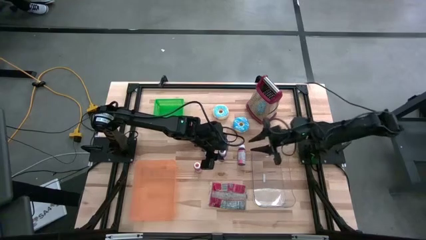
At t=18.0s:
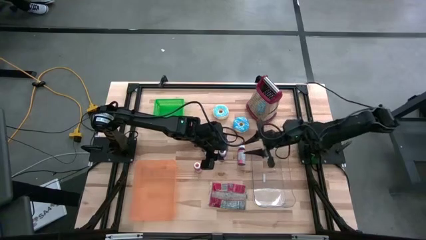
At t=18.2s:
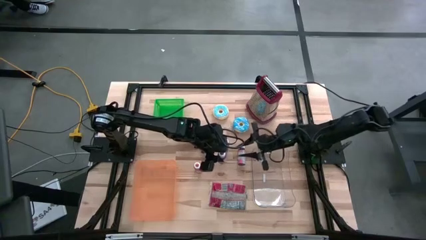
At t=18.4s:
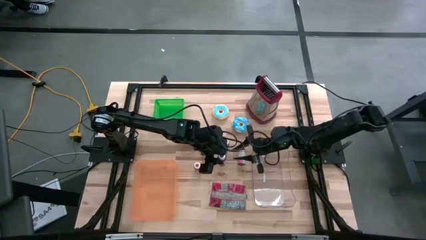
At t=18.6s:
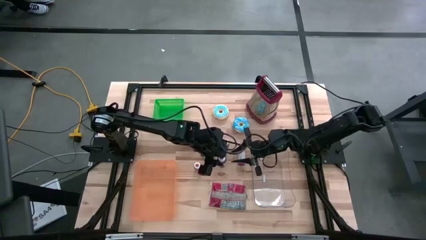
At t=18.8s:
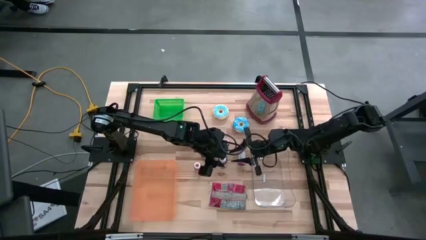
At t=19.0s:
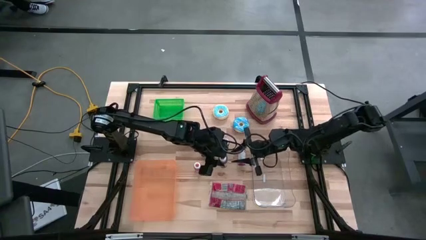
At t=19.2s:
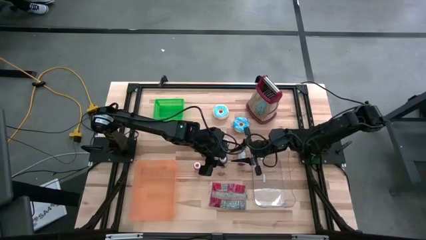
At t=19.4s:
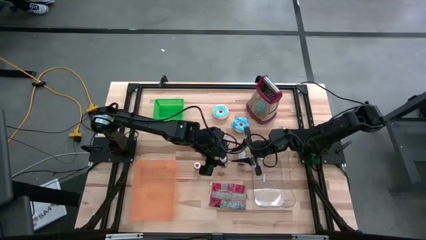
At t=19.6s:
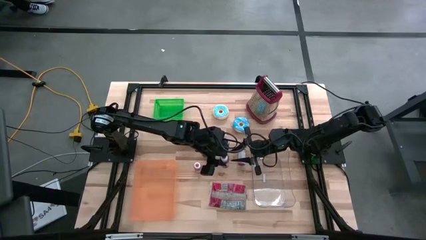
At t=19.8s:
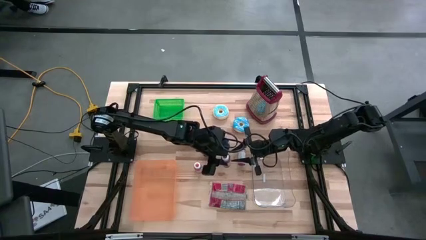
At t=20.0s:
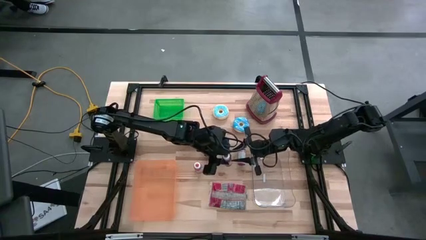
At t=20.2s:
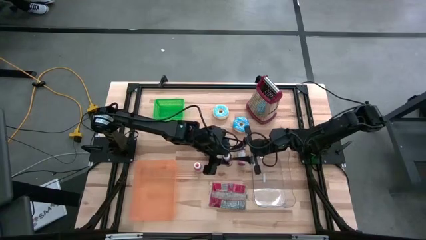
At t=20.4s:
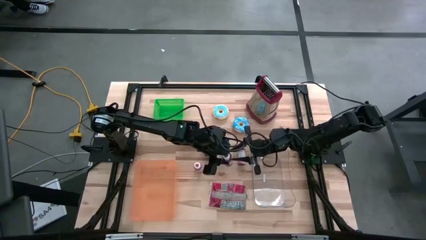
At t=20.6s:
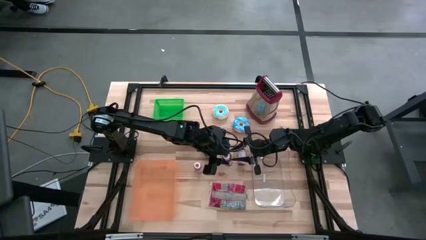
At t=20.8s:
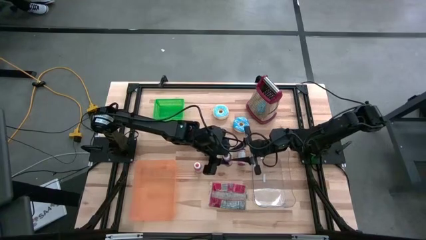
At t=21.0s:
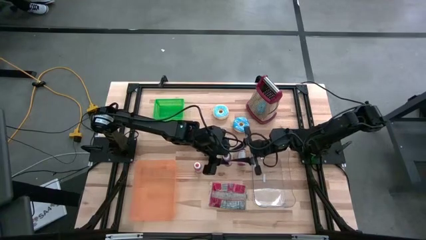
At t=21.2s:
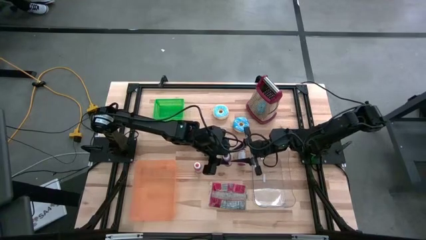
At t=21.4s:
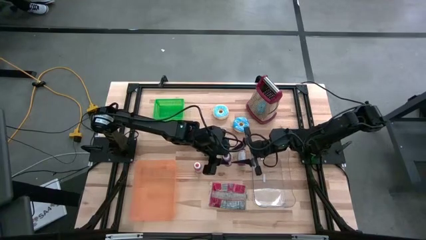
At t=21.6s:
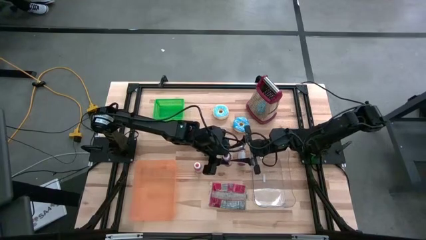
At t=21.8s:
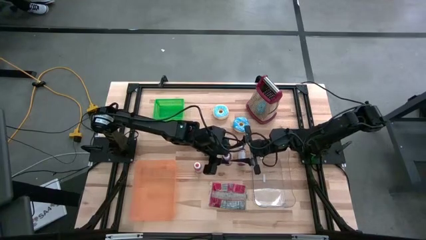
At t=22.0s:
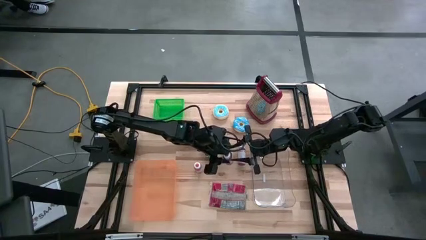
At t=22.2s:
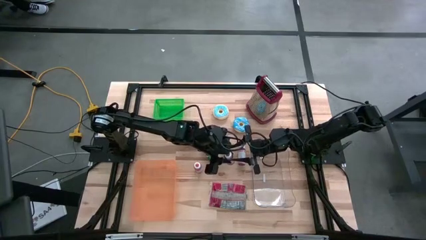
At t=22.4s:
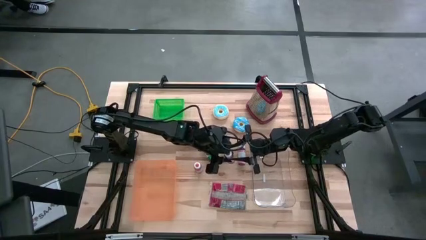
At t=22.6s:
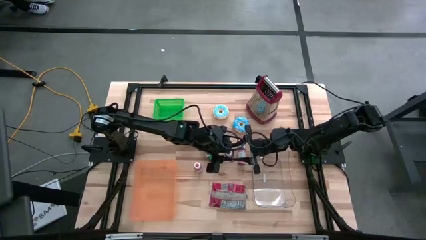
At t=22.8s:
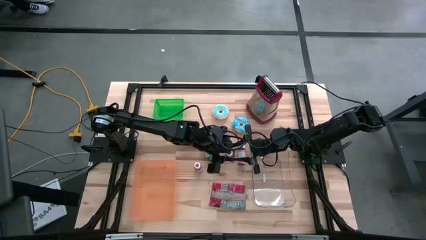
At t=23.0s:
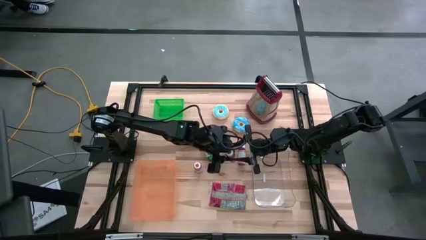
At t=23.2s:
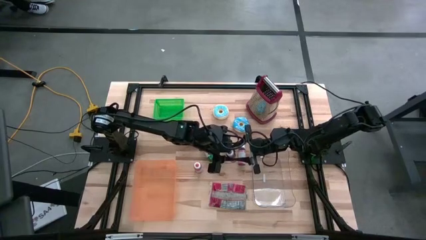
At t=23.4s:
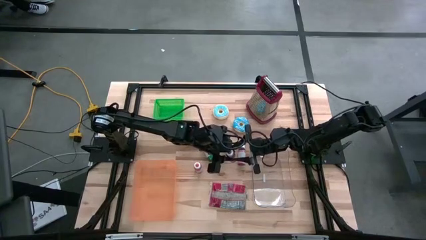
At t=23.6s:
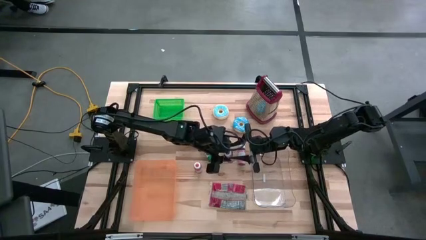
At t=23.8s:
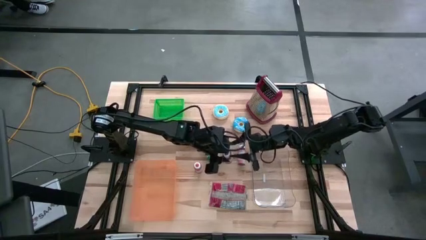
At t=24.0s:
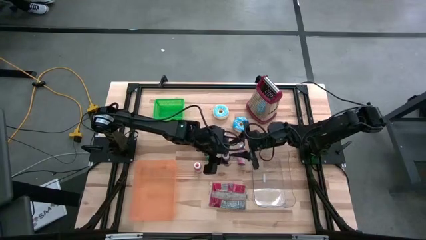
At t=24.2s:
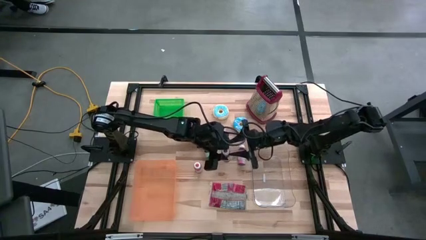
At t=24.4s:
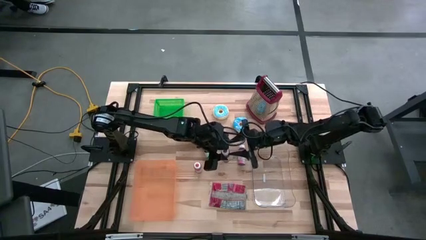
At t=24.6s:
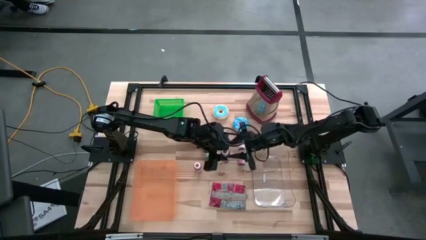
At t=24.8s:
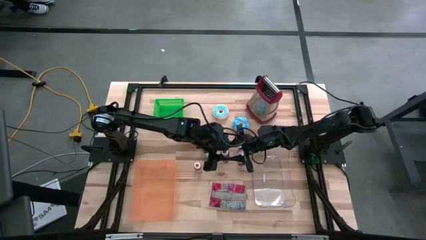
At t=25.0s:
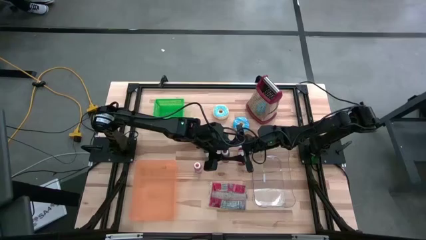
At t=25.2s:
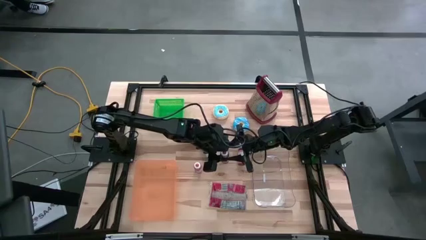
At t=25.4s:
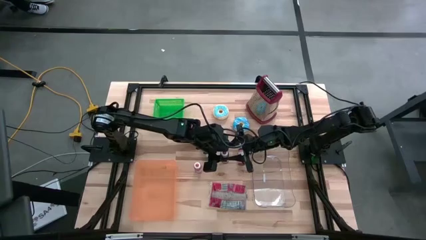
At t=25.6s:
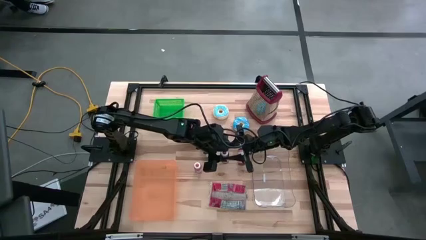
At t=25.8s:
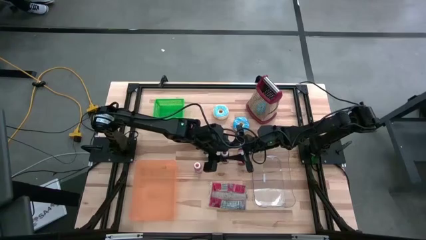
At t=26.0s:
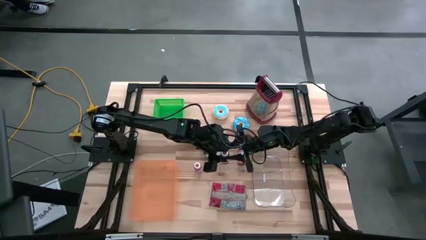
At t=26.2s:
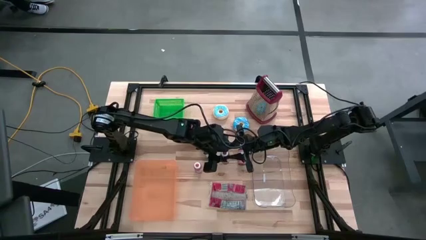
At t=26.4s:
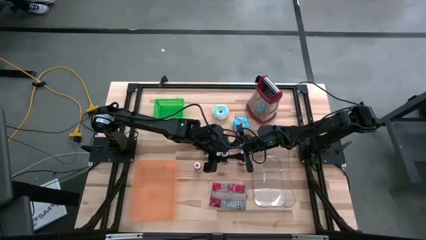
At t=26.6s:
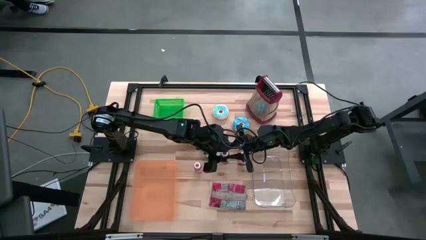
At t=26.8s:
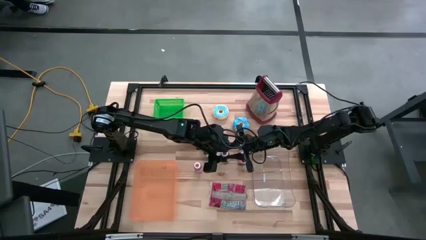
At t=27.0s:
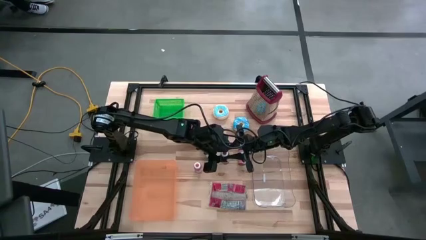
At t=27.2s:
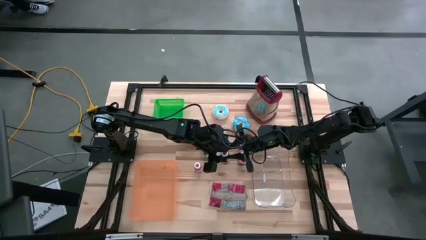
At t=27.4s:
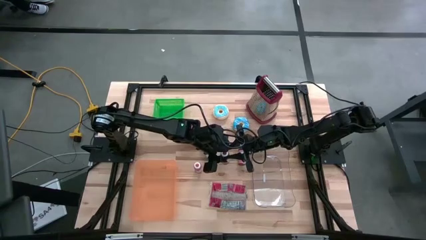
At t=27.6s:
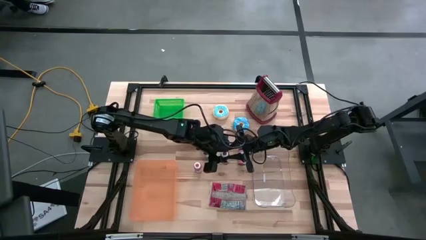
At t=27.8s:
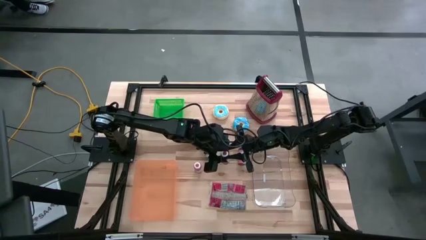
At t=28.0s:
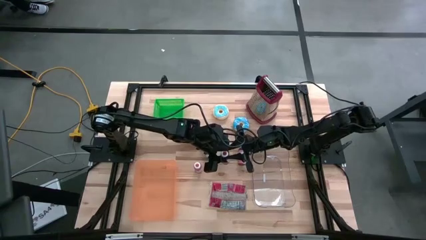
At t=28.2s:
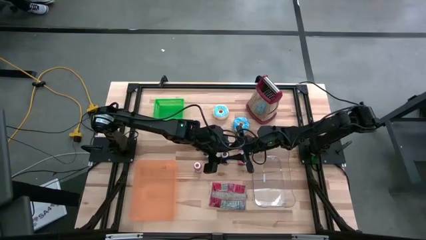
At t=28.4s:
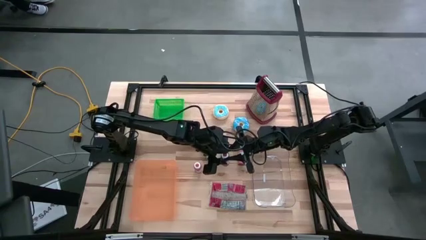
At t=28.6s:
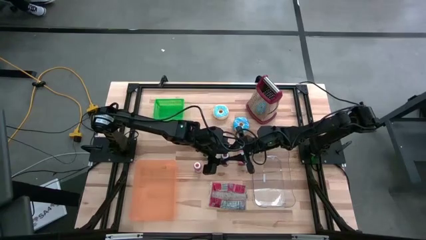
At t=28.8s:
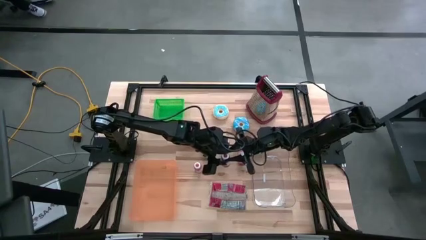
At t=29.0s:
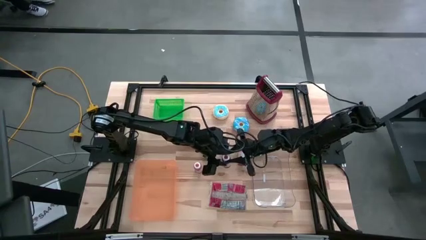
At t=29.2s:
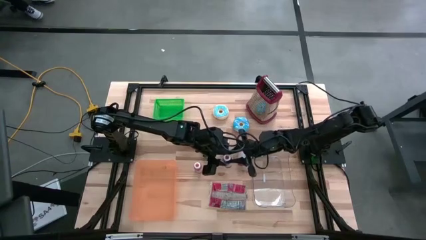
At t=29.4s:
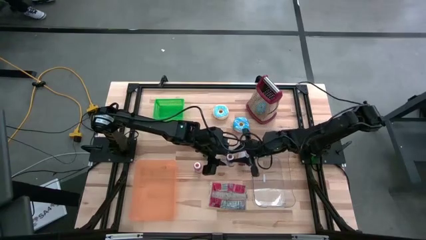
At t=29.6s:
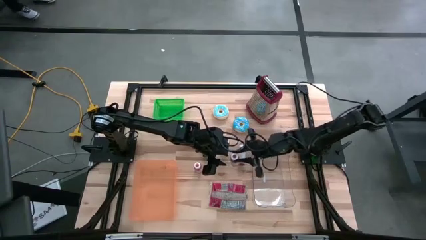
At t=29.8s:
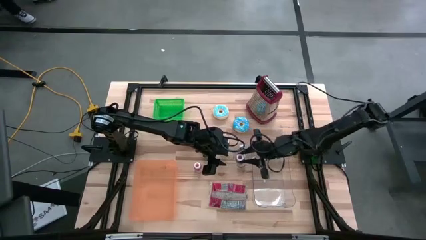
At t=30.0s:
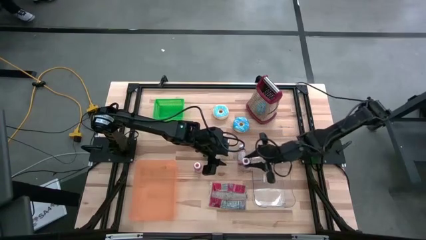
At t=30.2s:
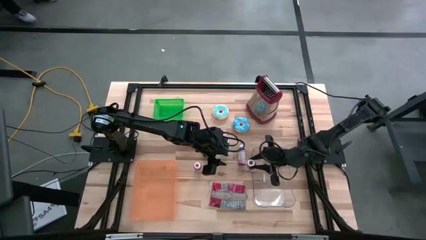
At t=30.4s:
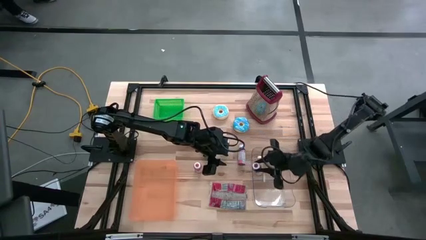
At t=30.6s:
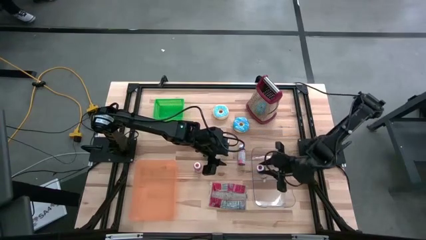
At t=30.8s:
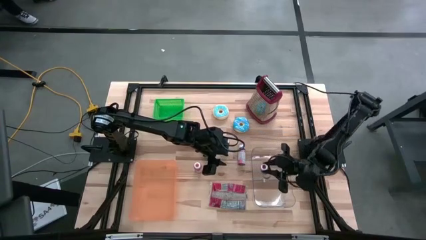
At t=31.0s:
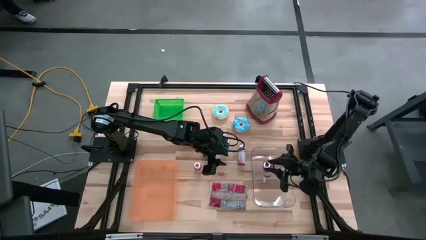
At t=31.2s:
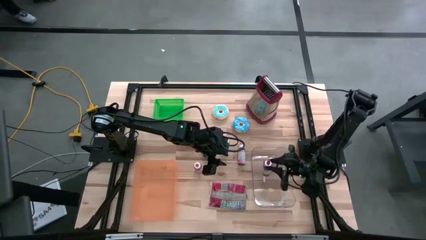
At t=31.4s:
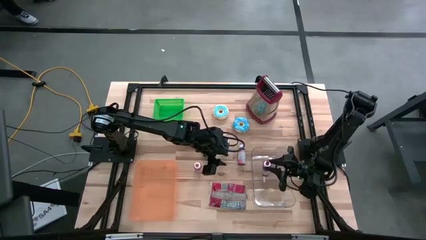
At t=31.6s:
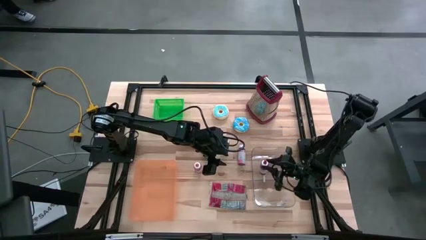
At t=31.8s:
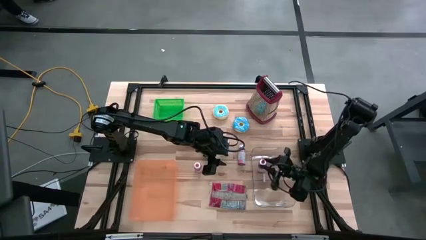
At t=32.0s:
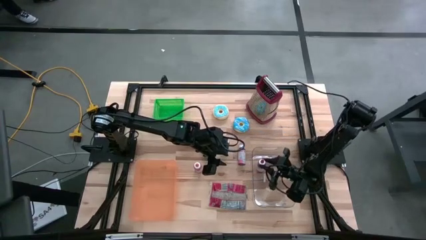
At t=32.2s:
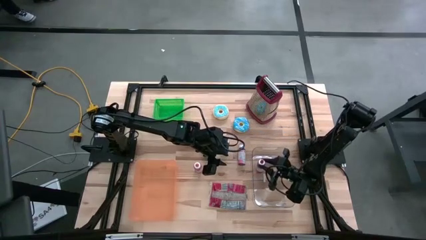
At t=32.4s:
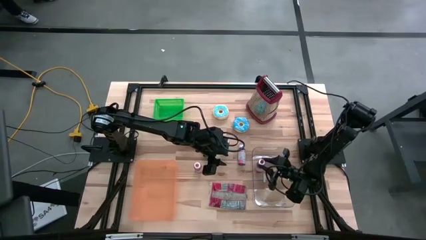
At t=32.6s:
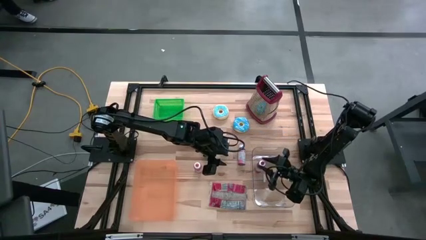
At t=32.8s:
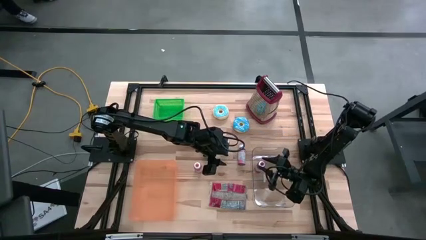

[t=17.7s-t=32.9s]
Put the red paint bottle into the transparent bin
